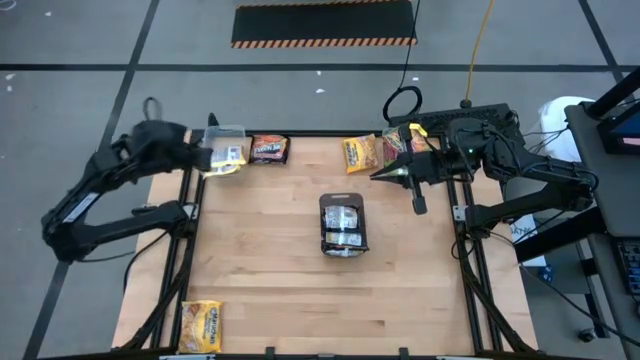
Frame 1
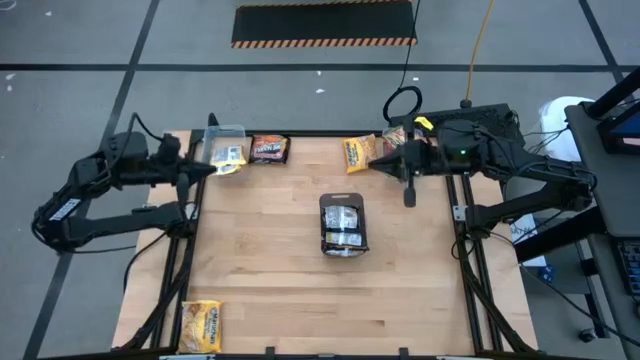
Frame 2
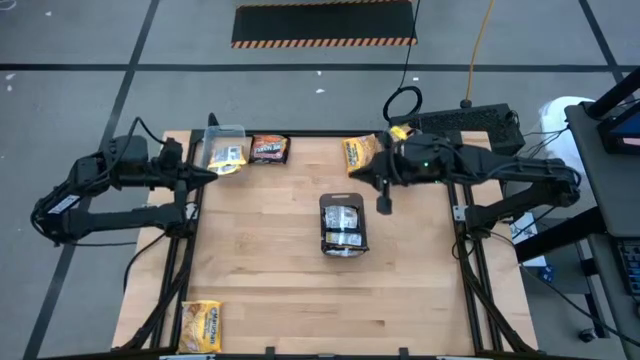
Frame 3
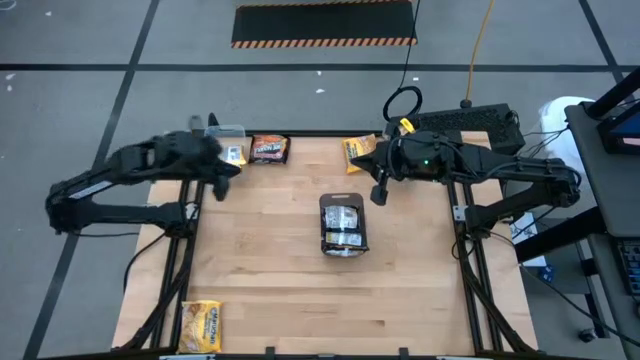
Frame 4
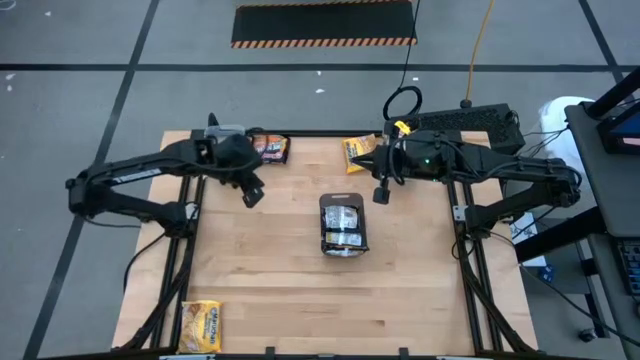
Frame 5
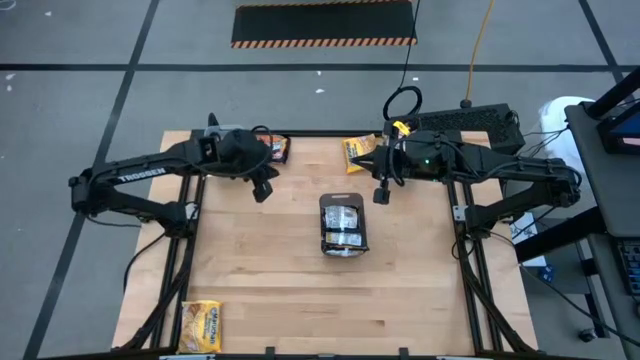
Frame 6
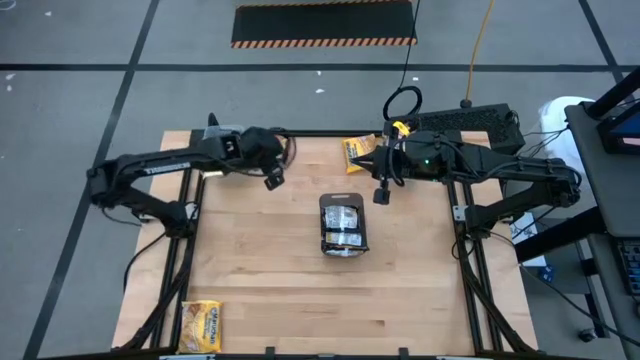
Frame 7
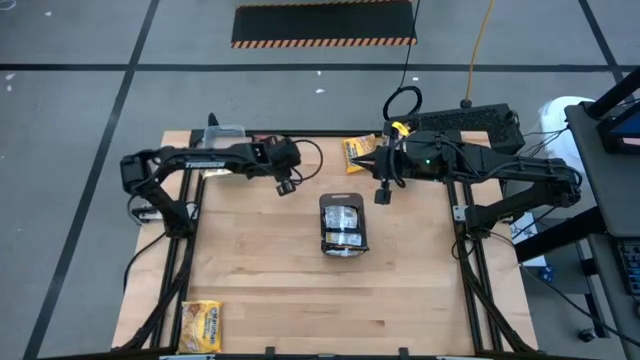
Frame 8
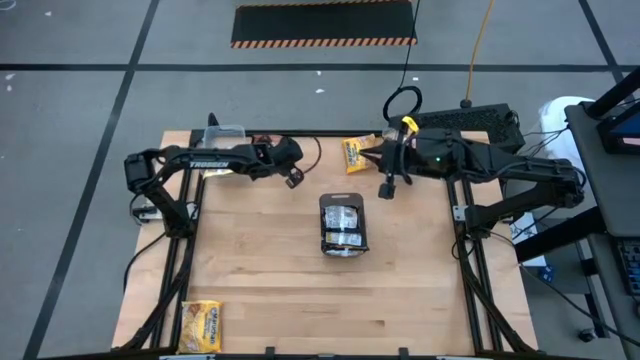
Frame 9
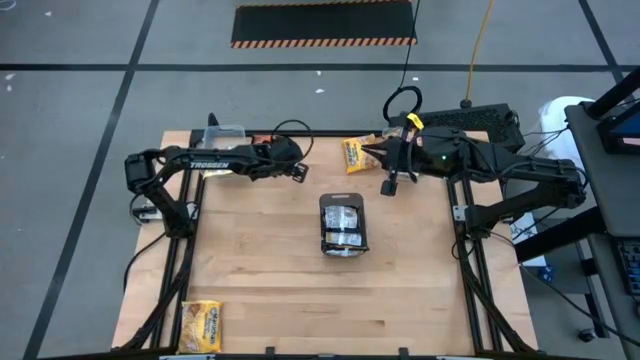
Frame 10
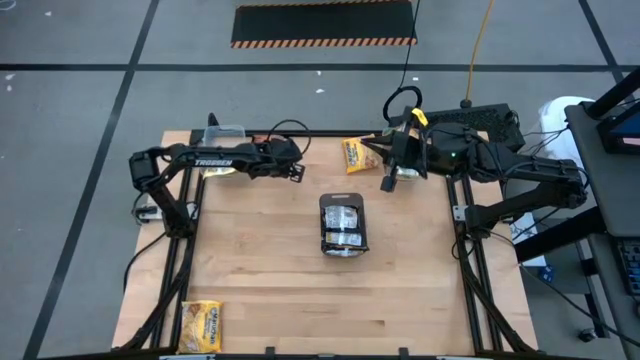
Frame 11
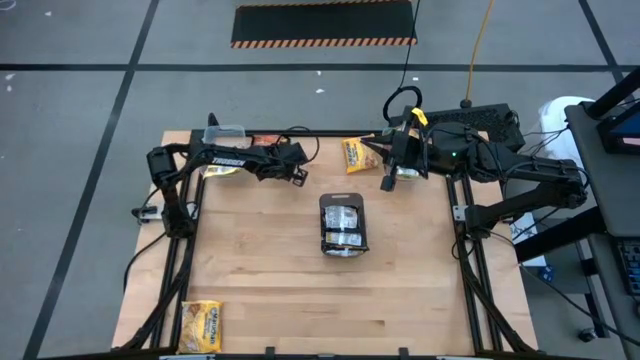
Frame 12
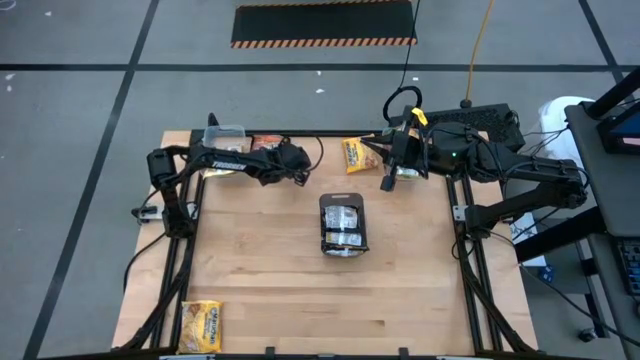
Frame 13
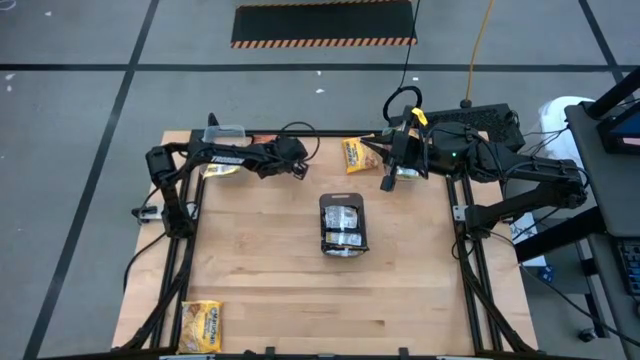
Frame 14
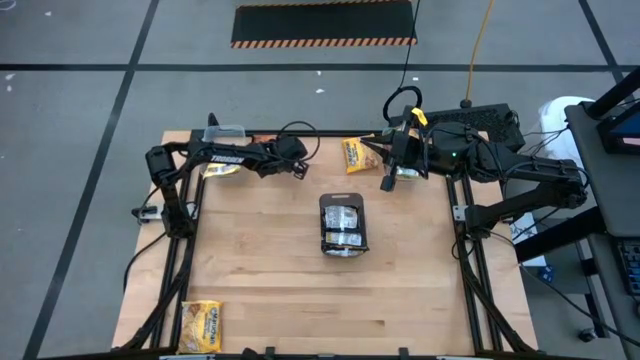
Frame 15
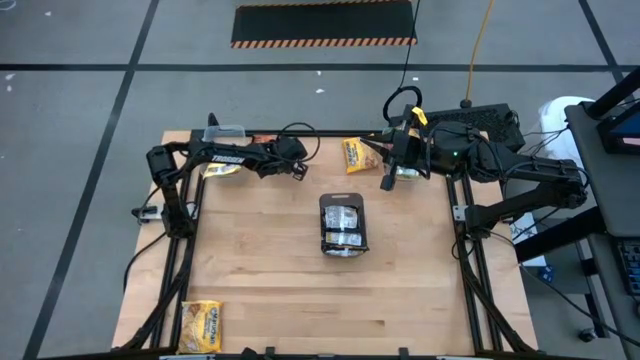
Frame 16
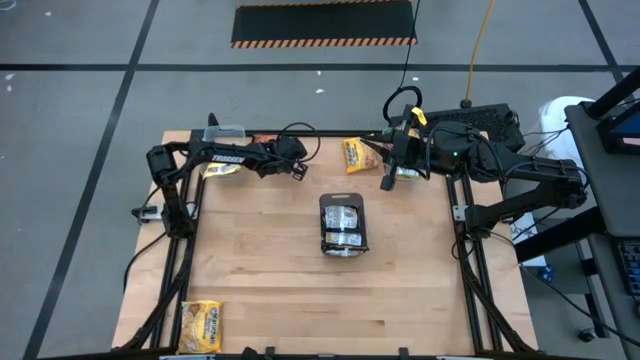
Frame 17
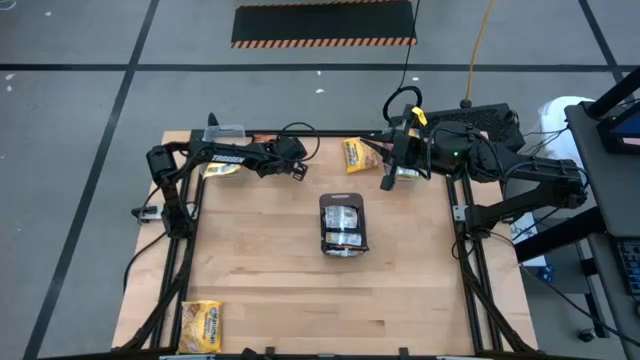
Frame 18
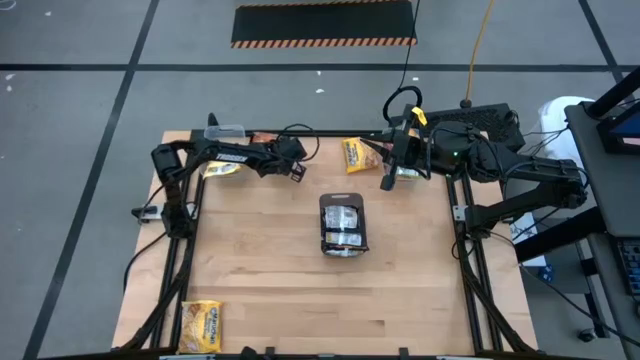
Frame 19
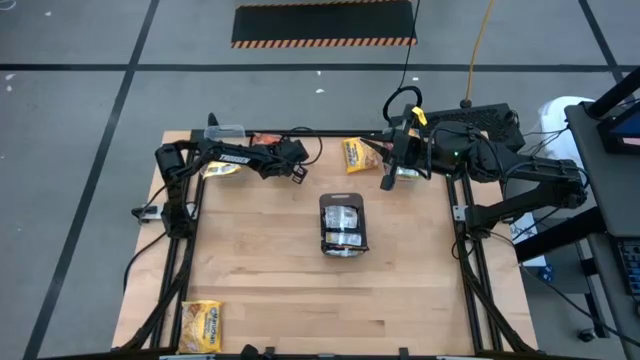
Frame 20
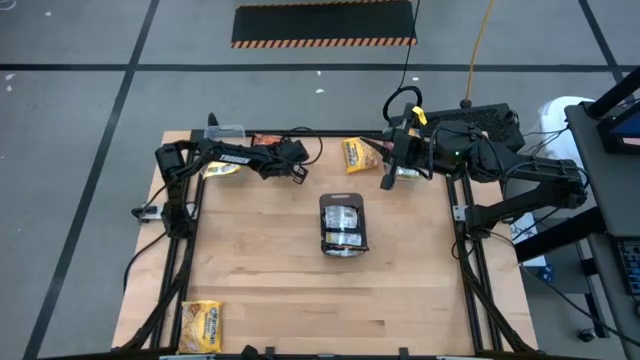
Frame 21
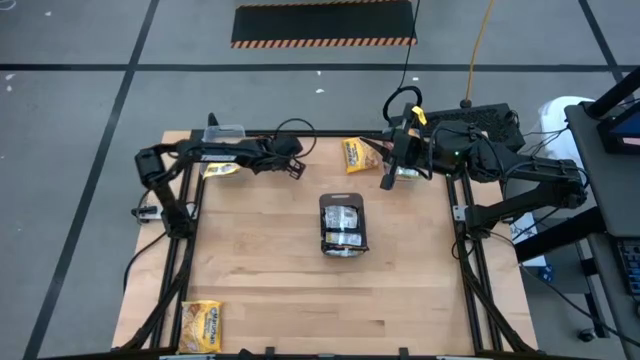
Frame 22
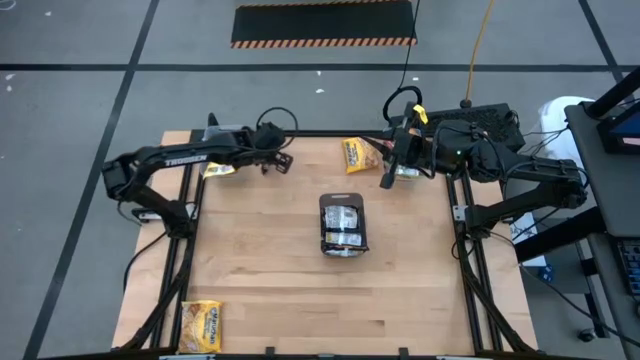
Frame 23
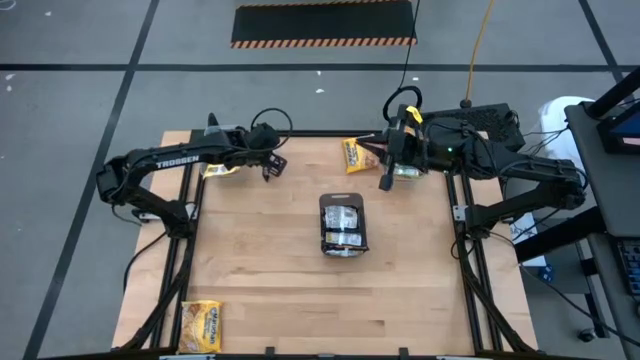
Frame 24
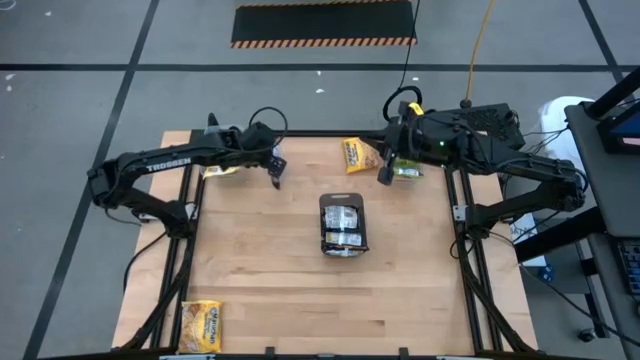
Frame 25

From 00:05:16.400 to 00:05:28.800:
Task: Sort Maruchan noodles
Put the black noodle pack into the black bin

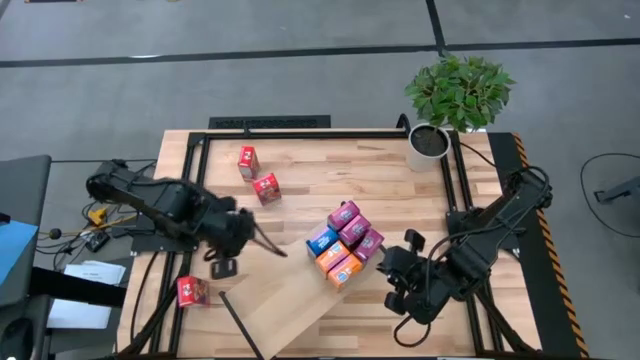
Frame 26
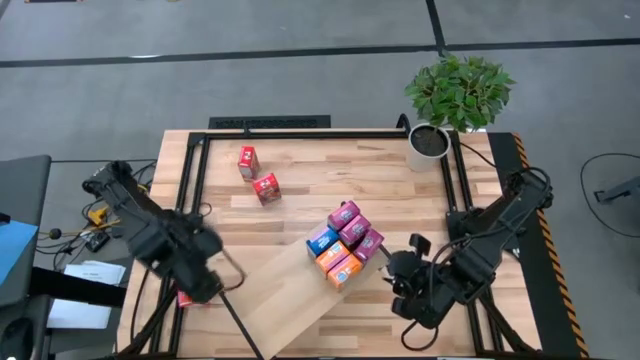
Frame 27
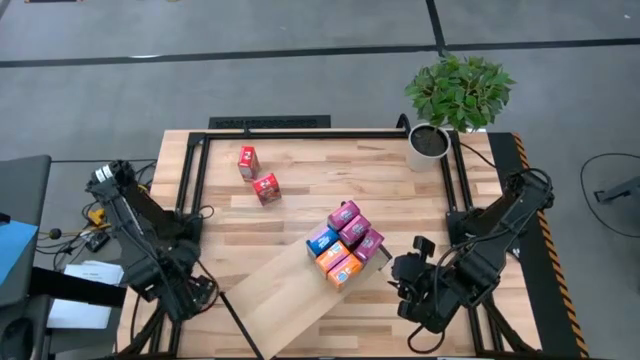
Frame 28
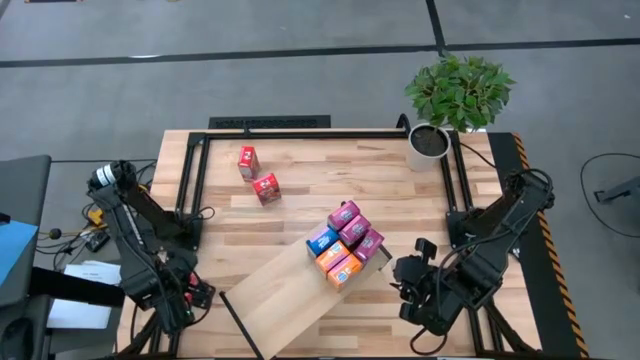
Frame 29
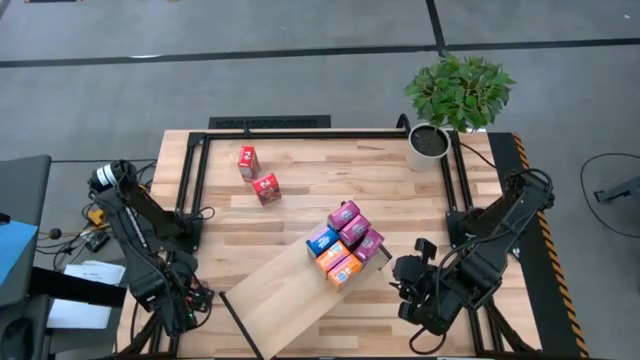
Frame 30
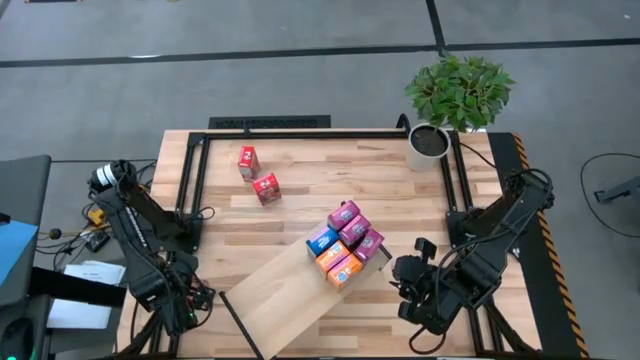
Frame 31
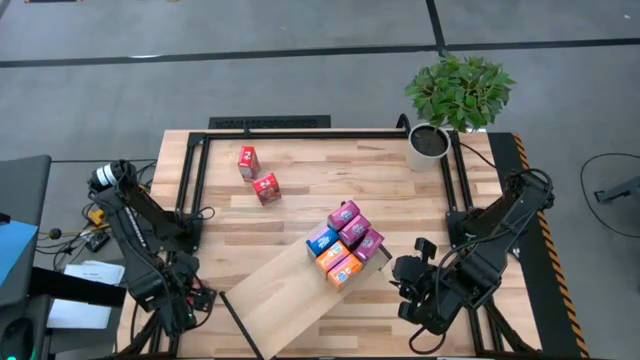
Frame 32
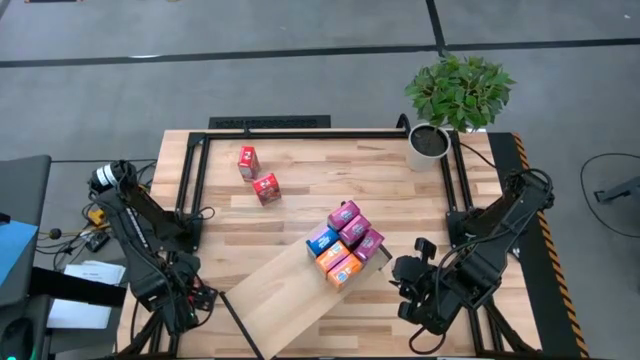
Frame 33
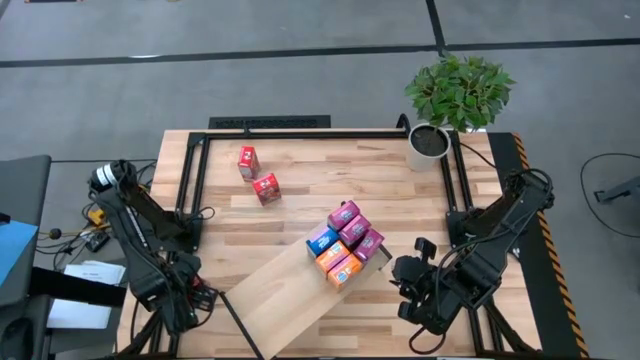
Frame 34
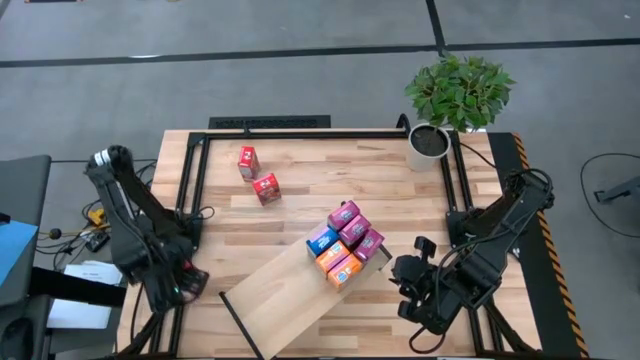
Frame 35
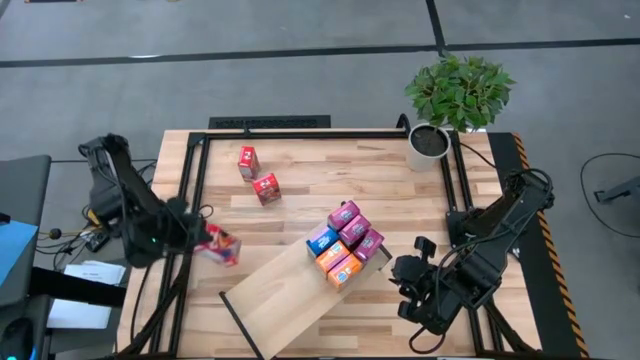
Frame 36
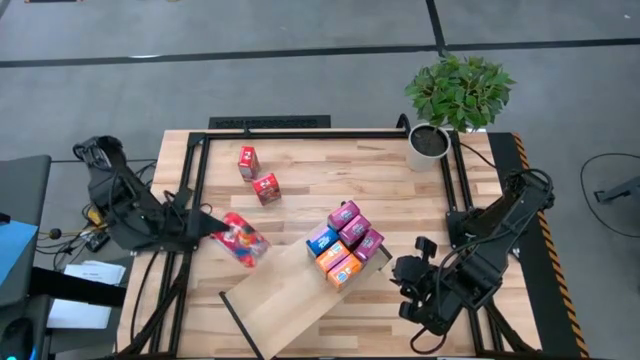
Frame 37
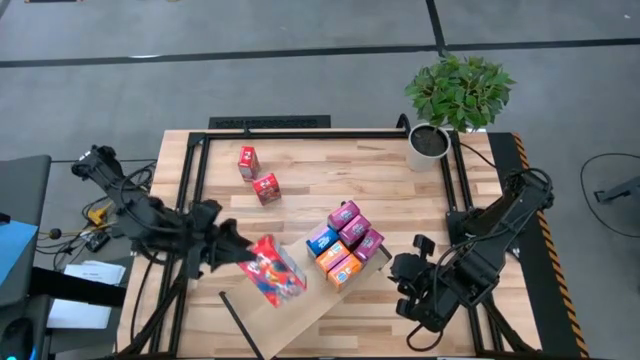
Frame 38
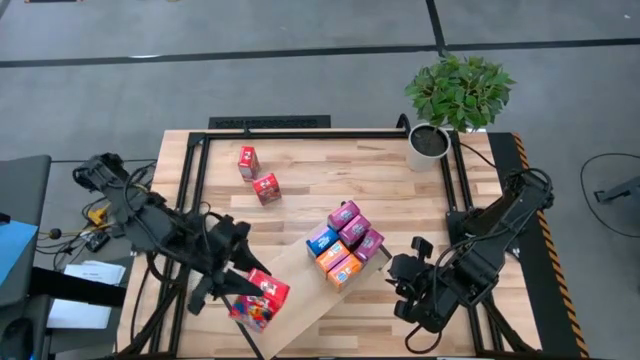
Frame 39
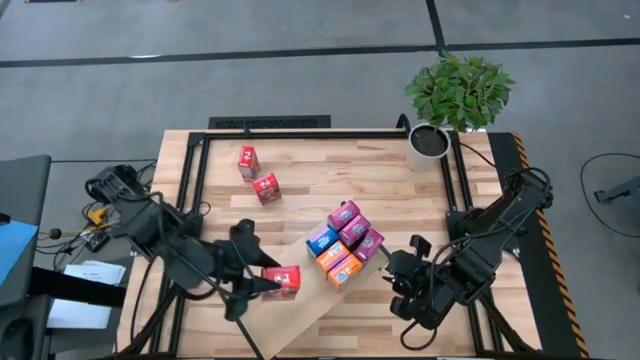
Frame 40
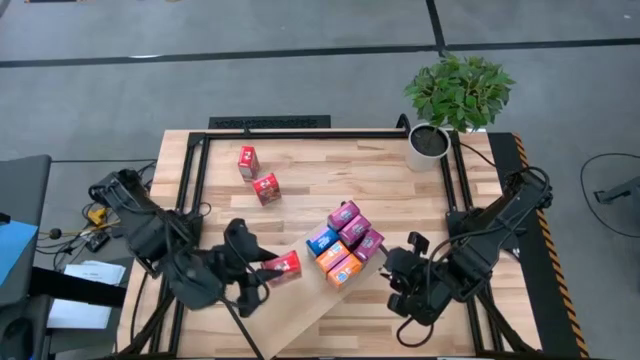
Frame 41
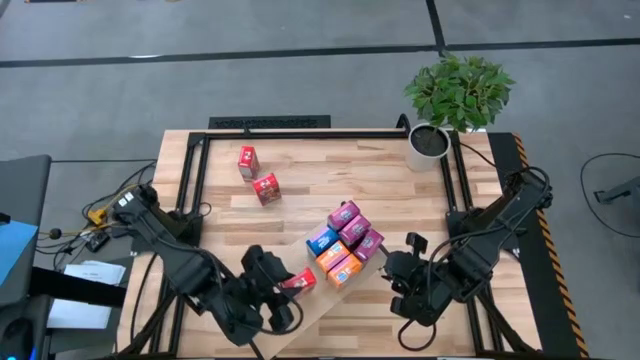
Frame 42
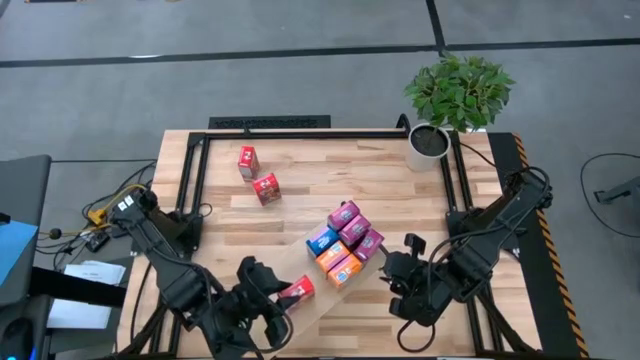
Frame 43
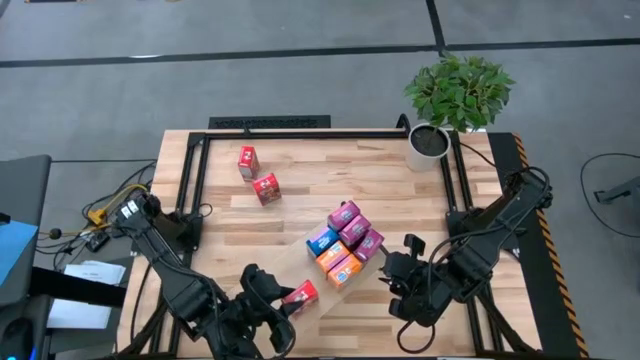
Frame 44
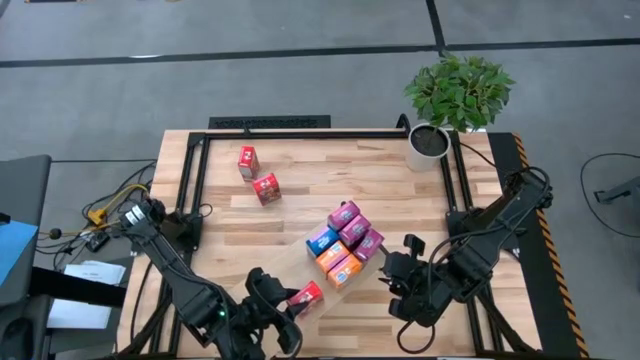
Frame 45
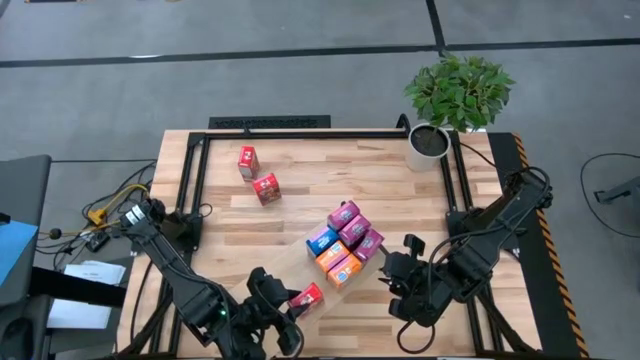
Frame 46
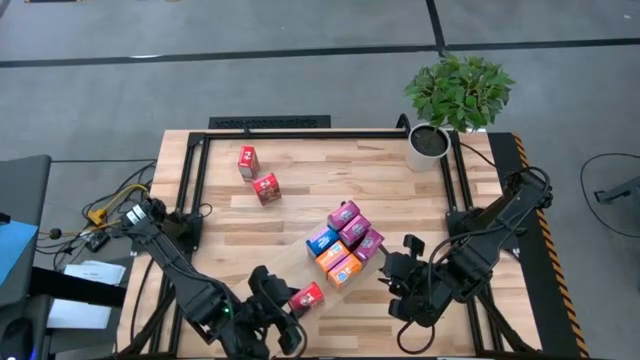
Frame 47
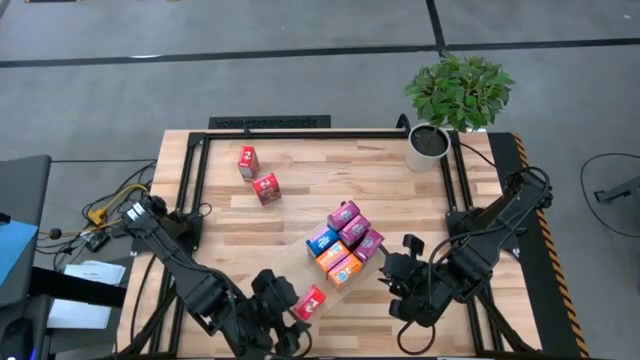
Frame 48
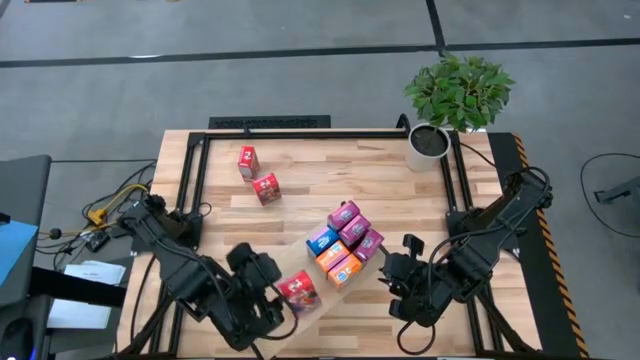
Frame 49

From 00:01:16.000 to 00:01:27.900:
Task: Stack cereal on shelf
Put the bottom red cereal box onto the shelf
